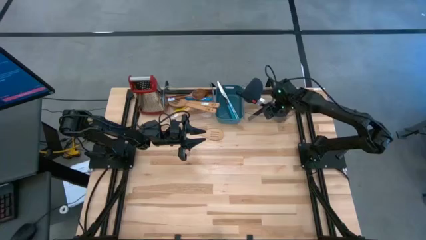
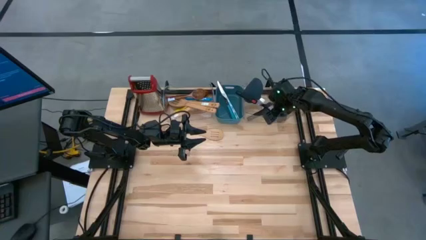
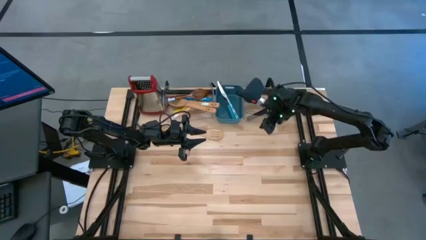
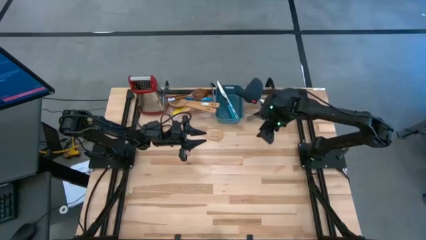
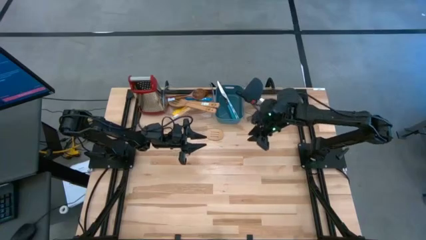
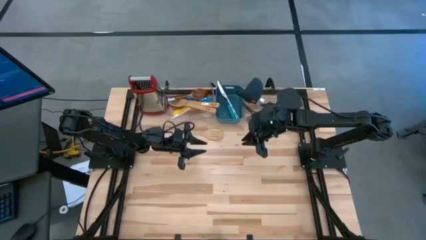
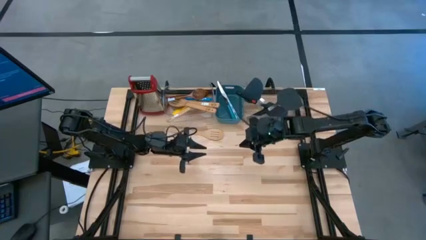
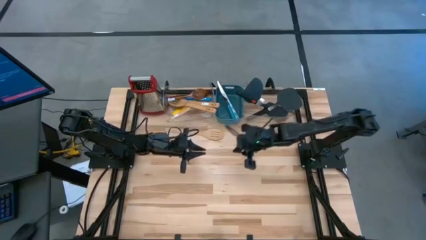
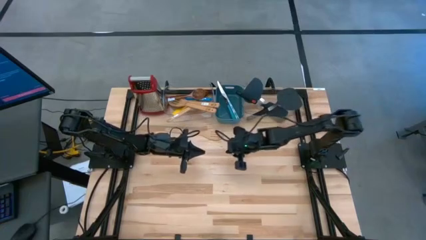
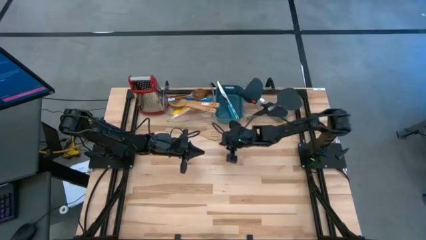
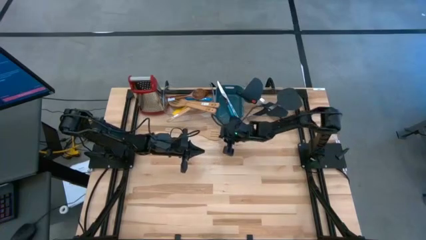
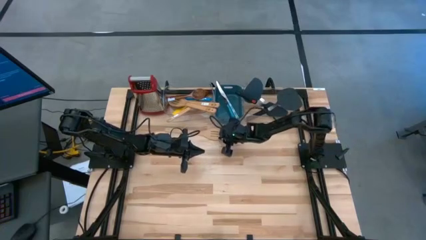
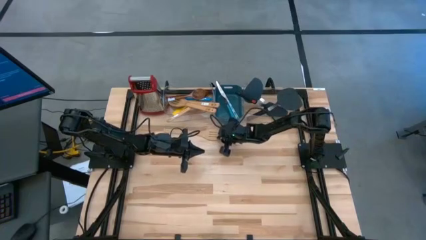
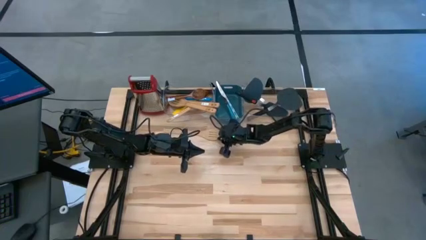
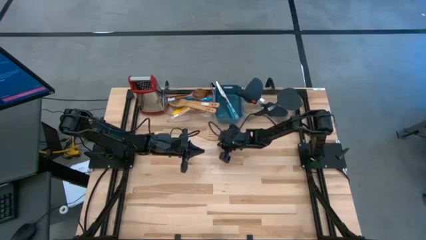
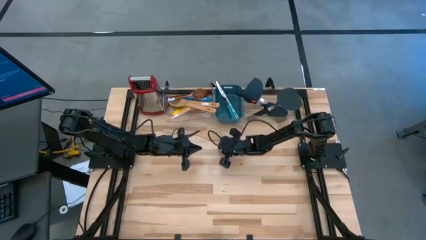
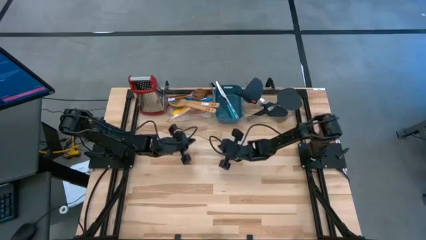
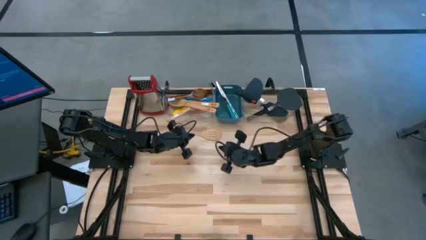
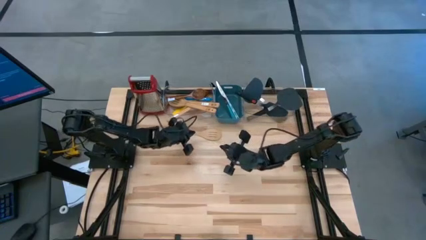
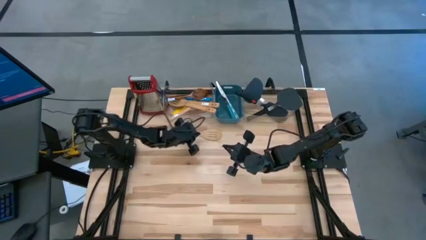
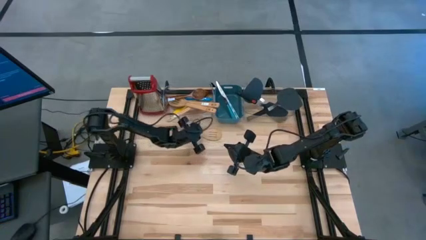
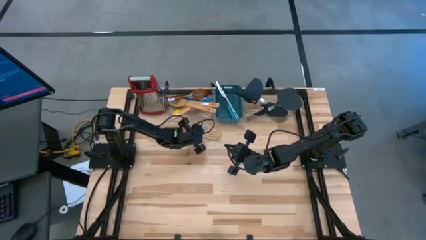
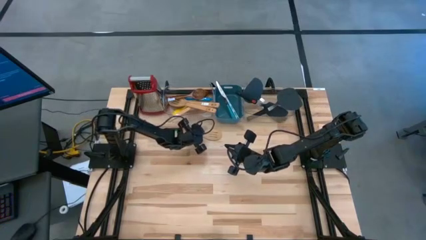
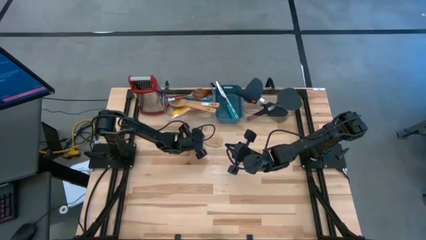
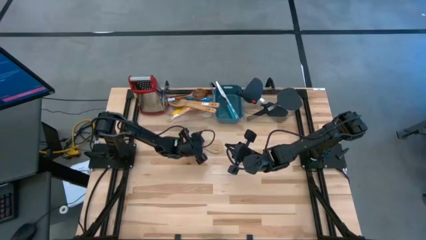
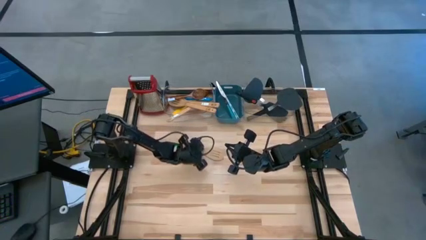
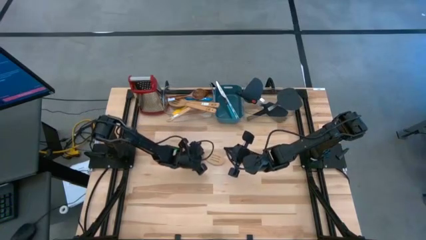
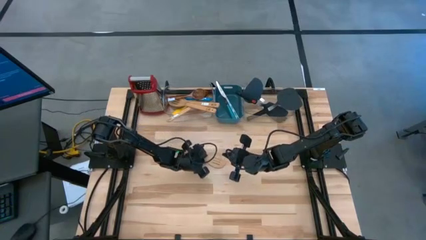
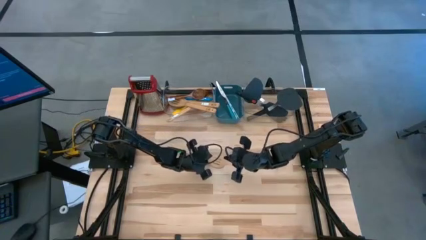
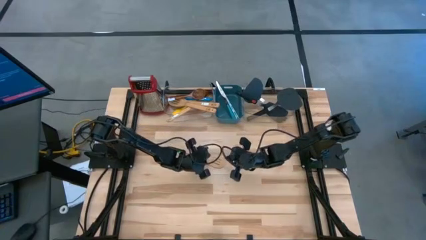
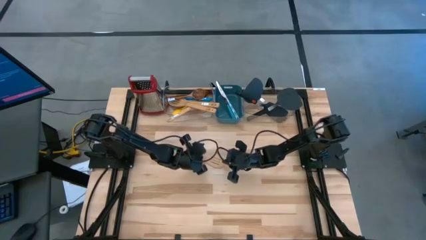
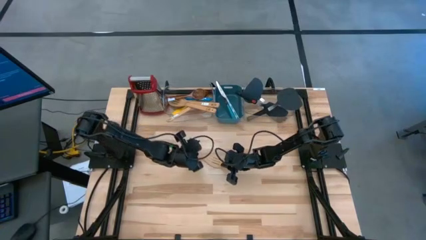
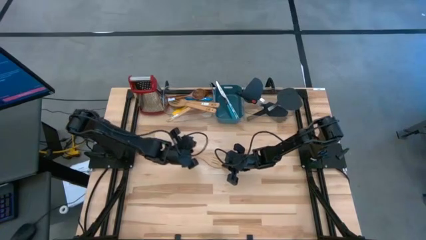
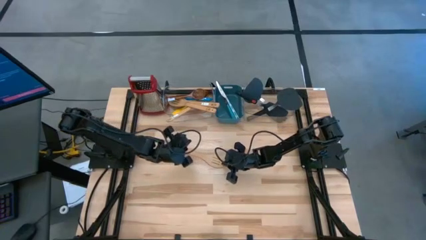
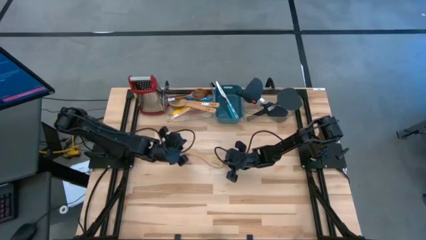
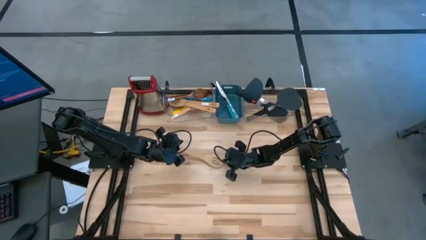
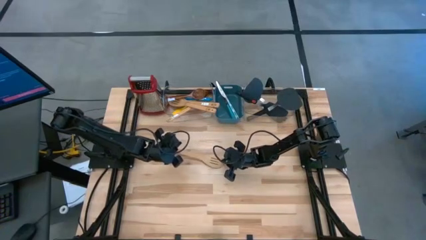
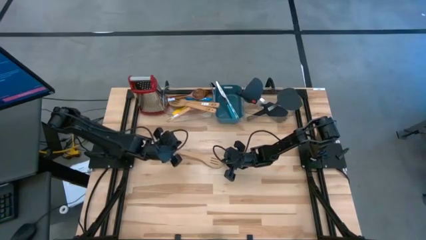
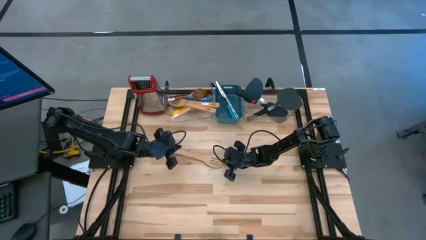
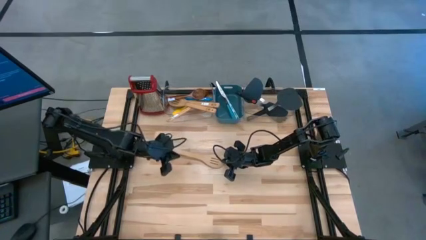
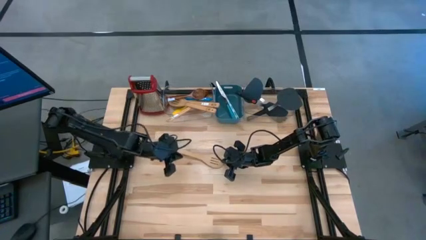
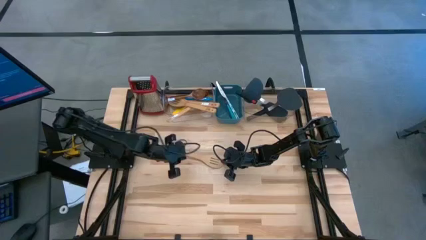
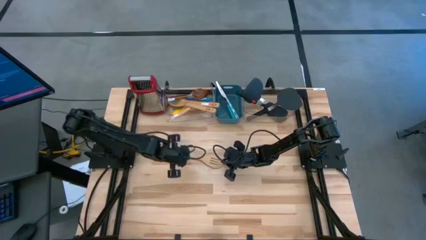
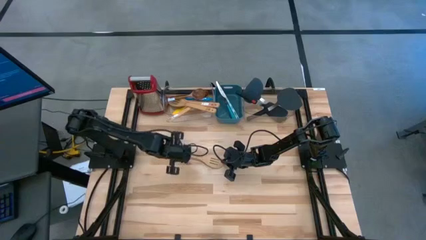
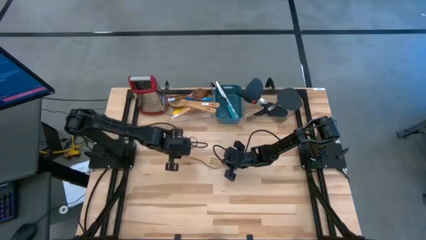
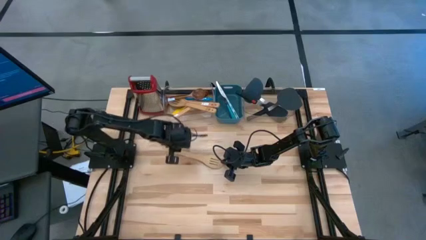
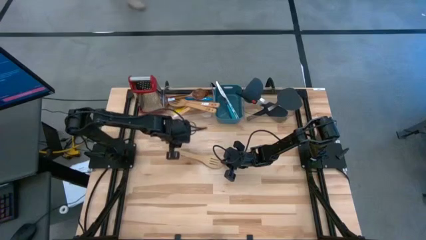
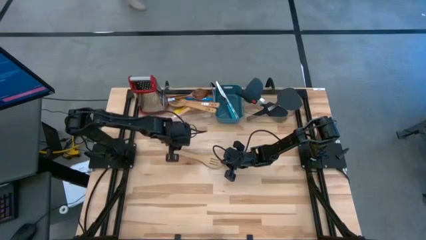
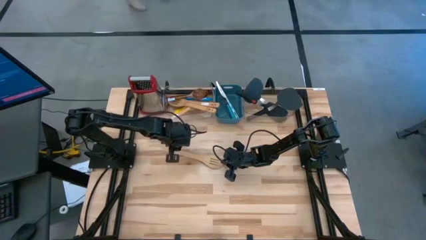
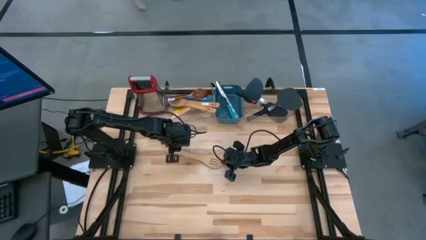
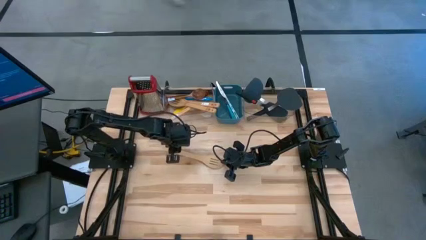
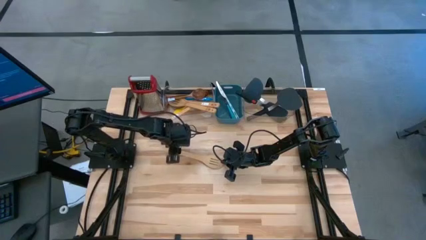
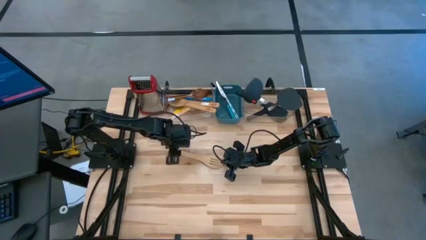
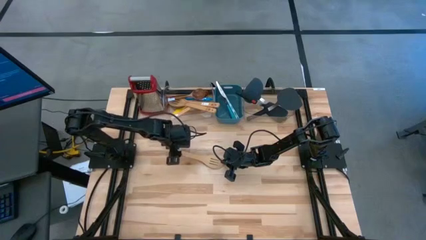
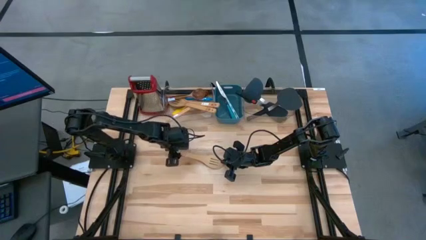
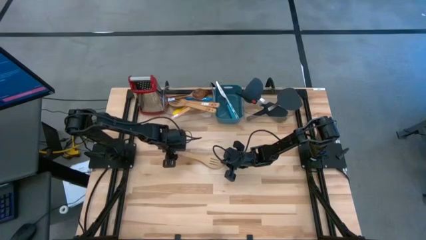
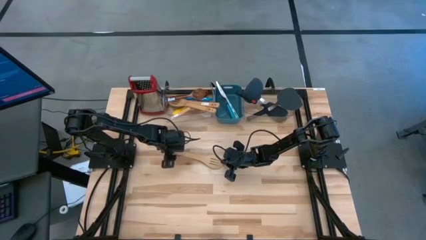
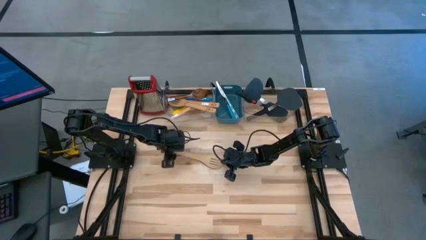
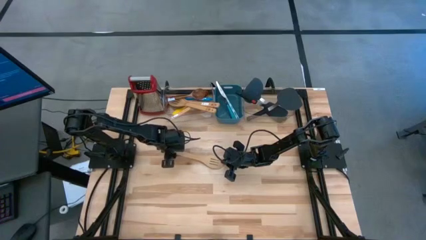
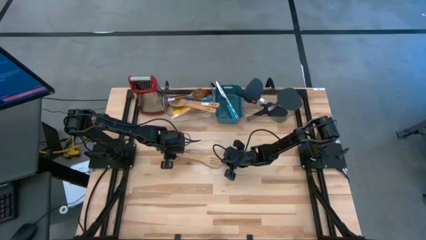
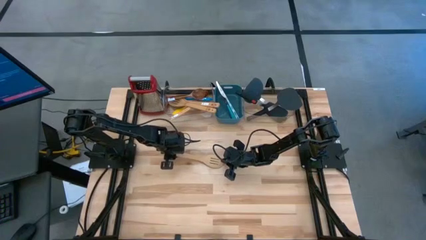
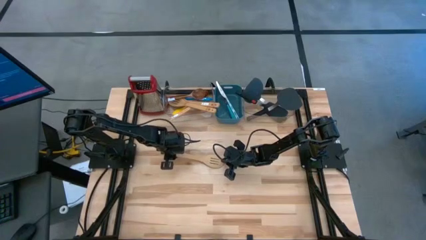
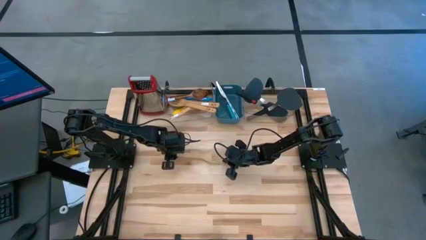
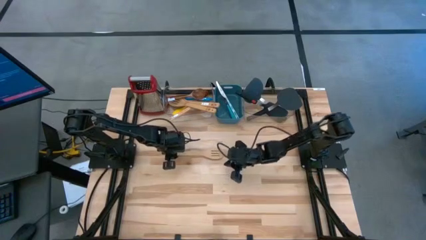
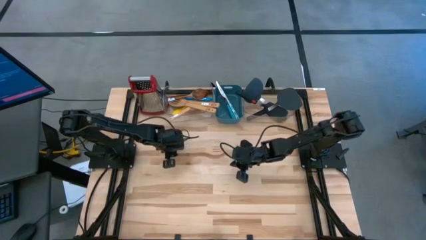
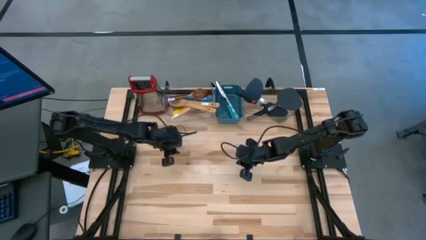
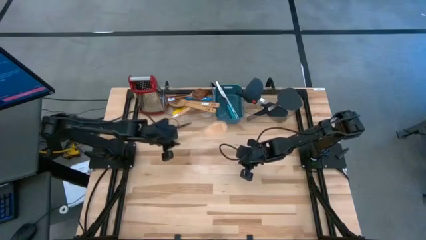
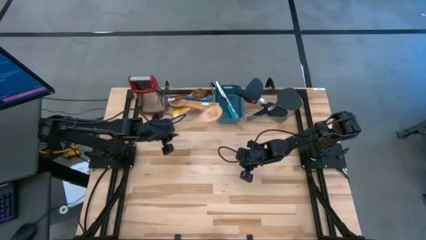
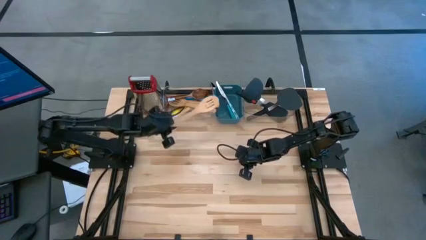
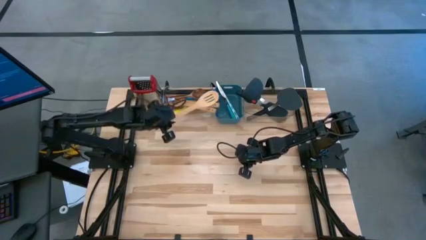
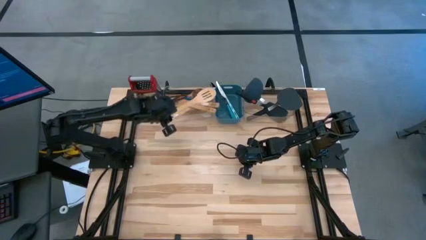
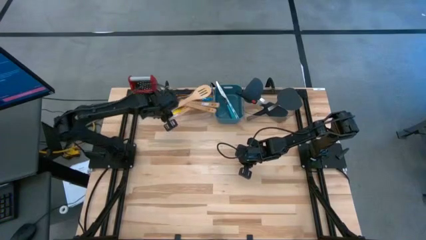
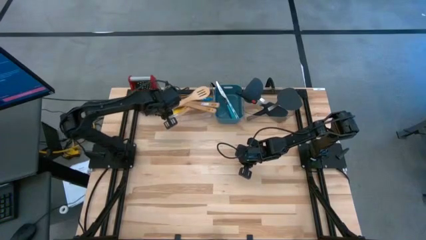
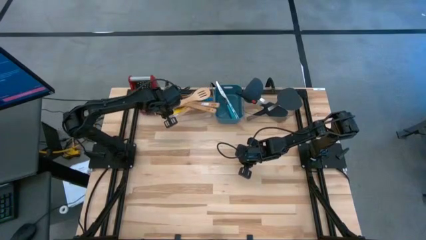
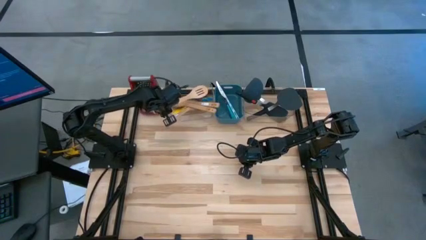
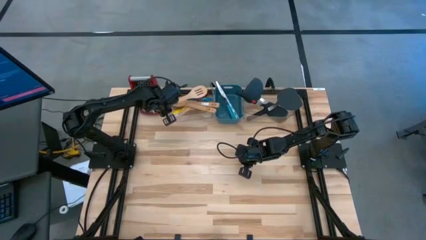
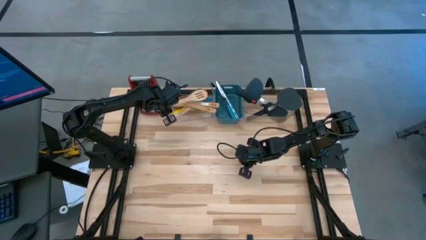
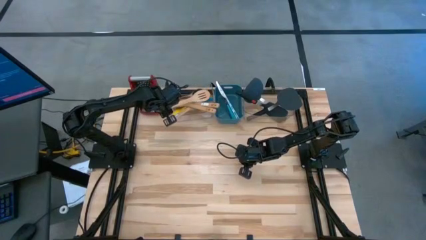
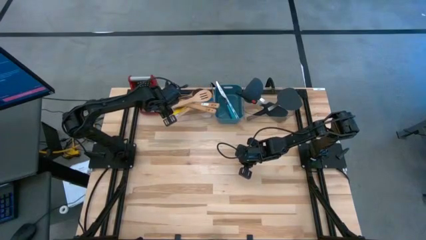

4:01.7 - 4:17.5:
Task: Pick & Place Kitchen Items
Put the brown slotted spoon into the left transparent bin

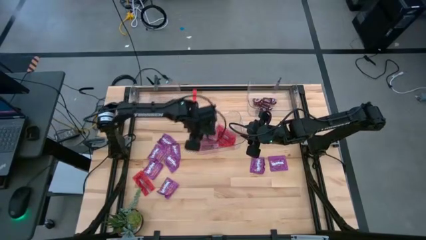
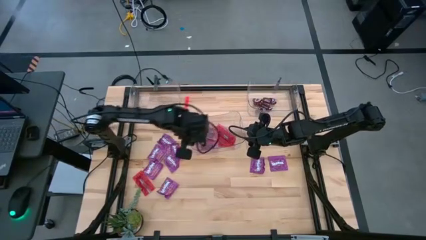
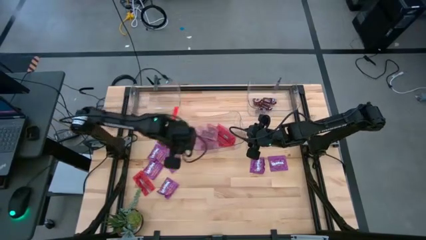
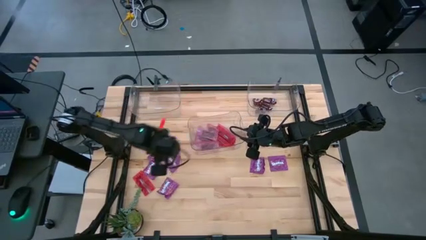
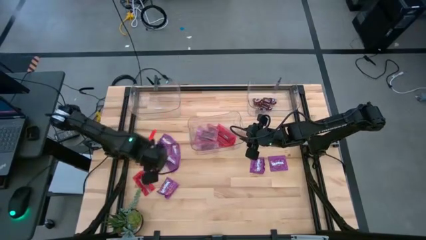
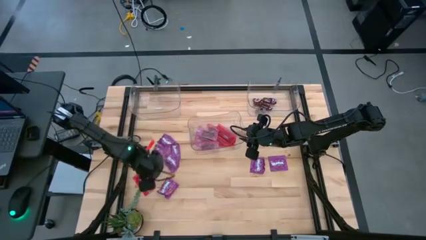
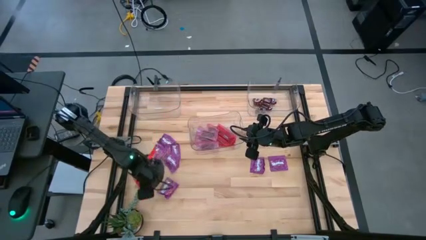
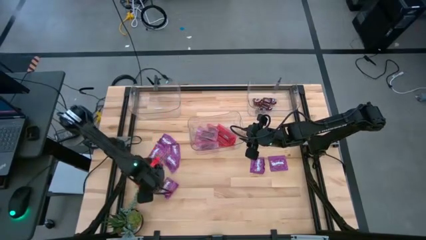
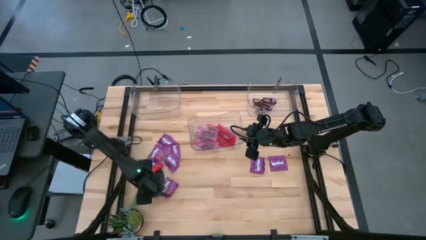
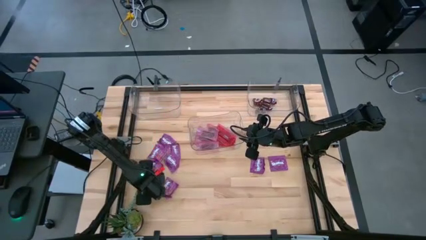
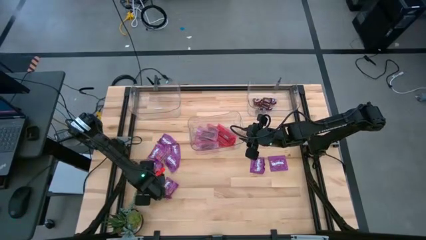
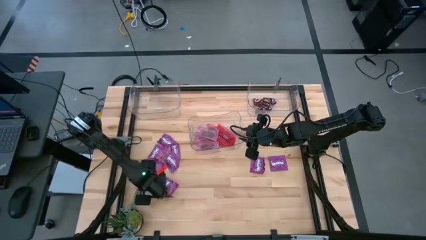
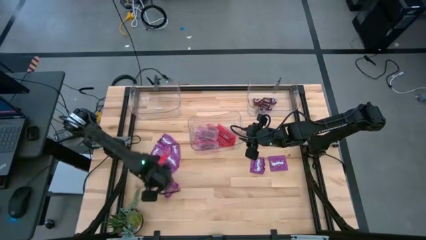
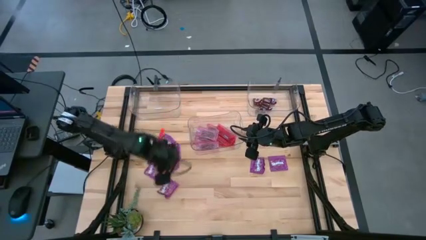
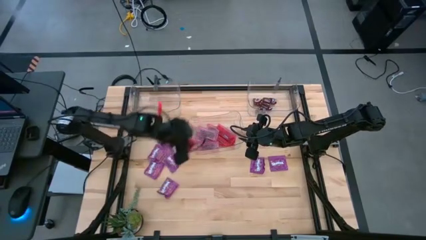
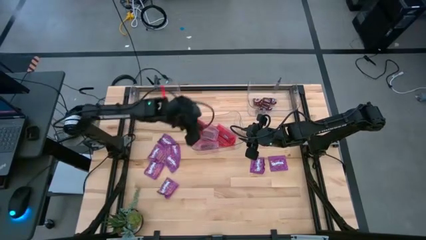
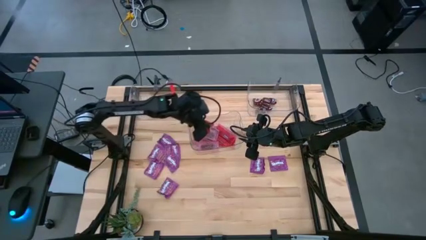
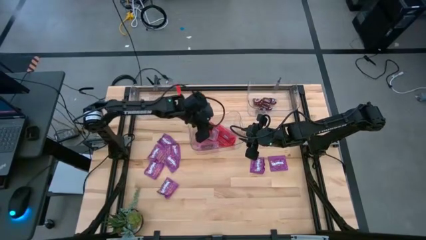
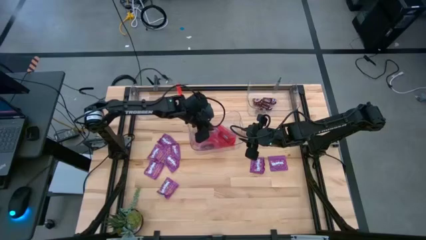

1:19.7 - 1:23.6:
Task: Sort candy
Put the red candy pack into the bottom transparent bin
